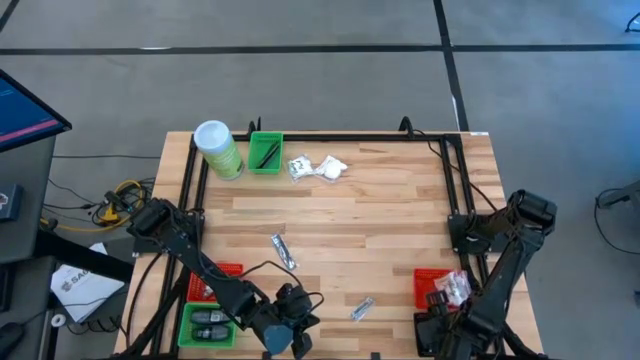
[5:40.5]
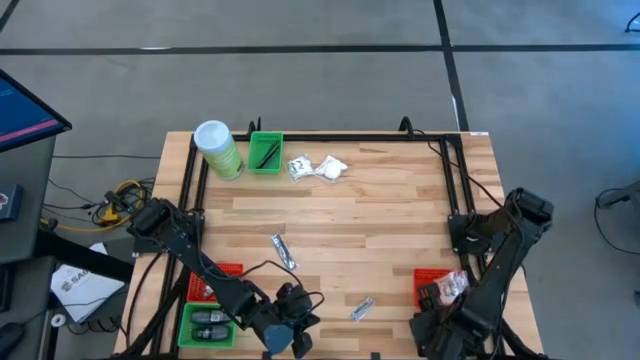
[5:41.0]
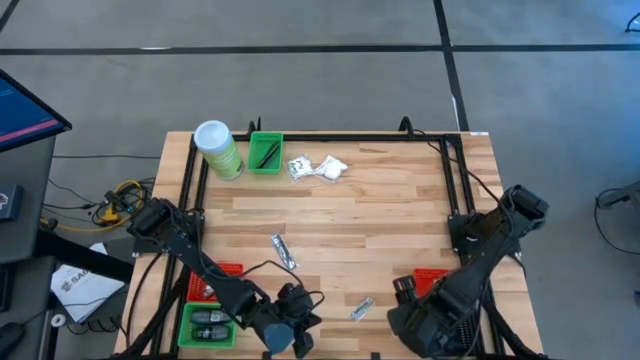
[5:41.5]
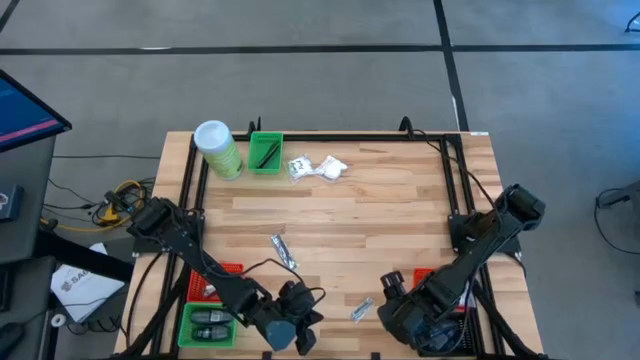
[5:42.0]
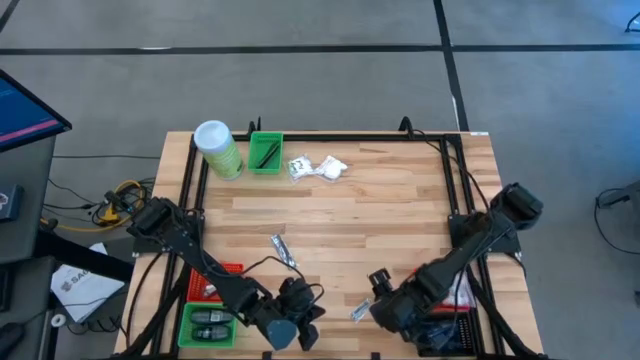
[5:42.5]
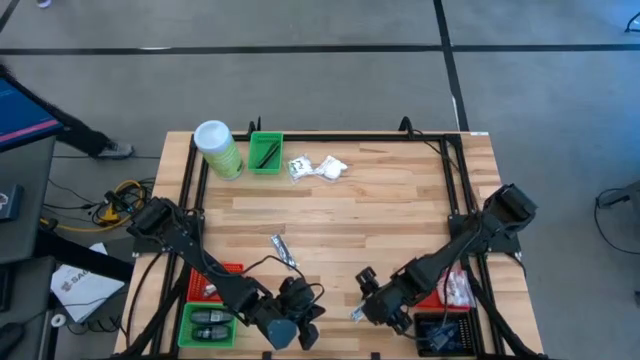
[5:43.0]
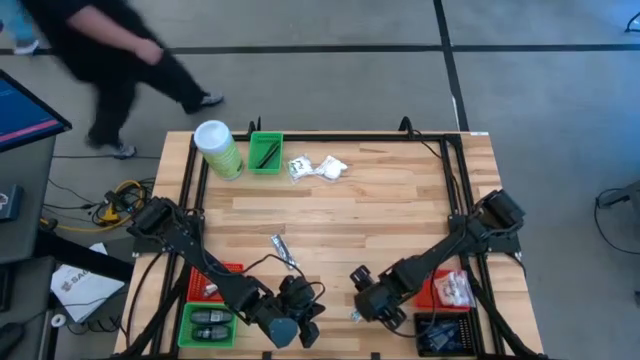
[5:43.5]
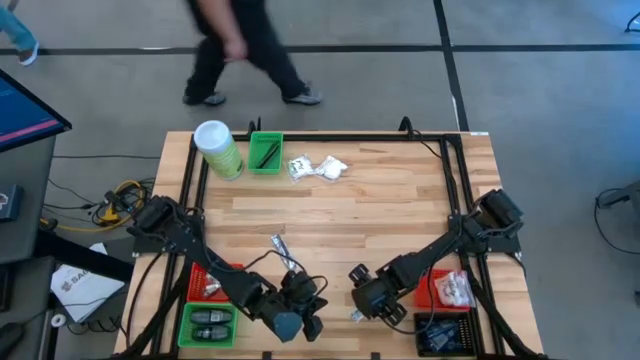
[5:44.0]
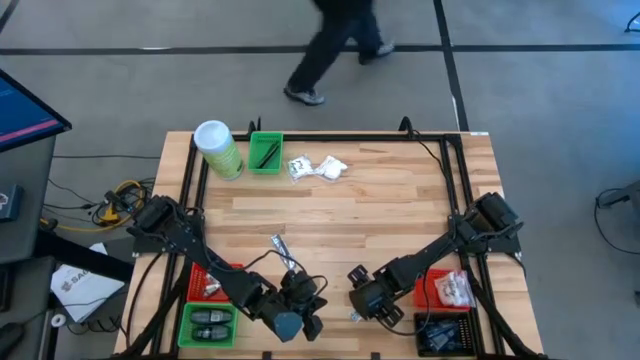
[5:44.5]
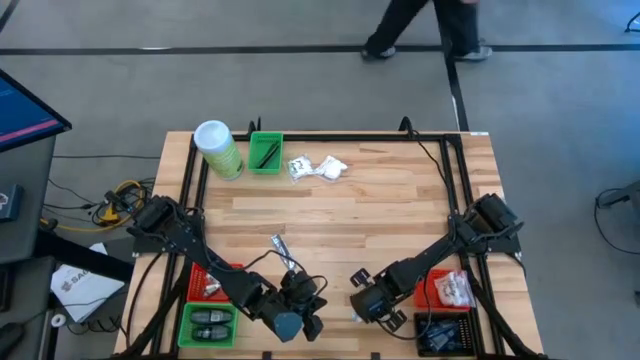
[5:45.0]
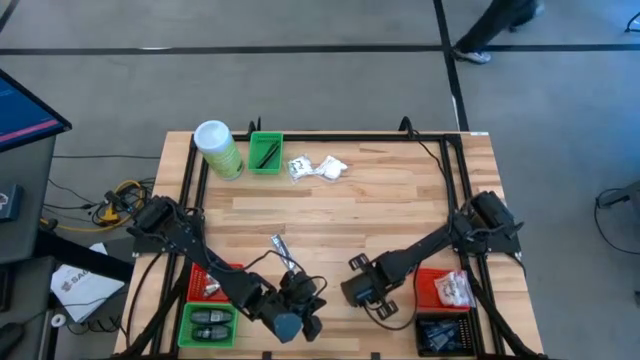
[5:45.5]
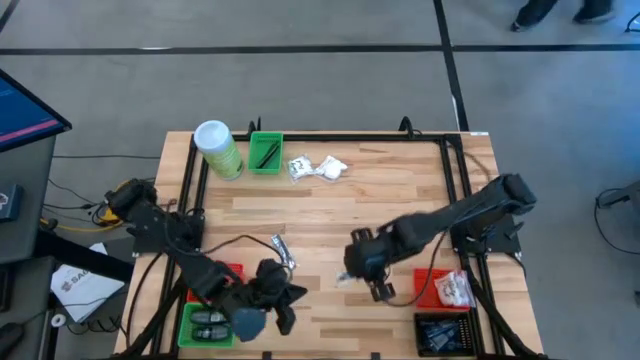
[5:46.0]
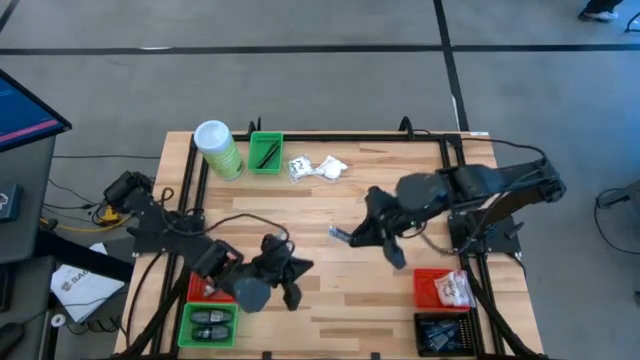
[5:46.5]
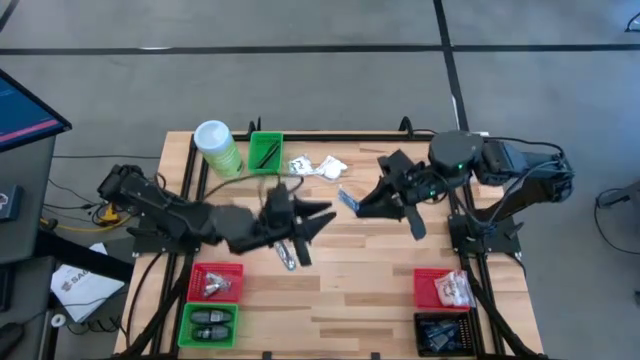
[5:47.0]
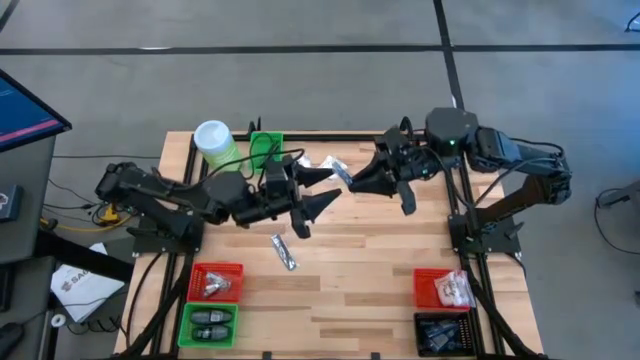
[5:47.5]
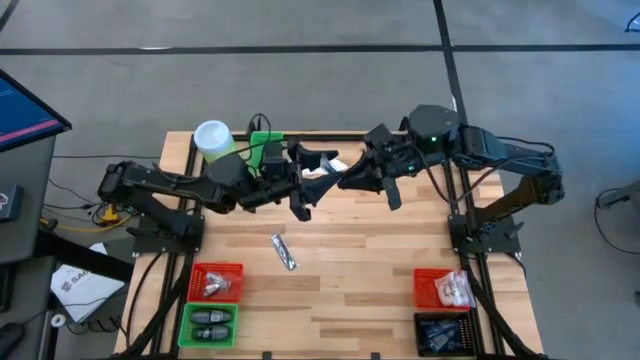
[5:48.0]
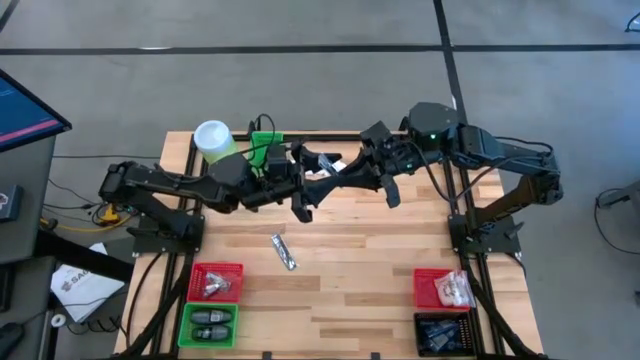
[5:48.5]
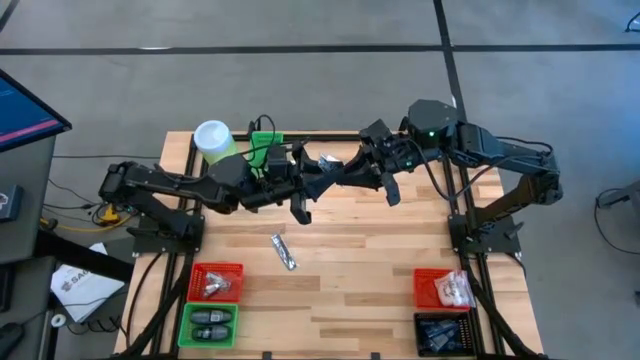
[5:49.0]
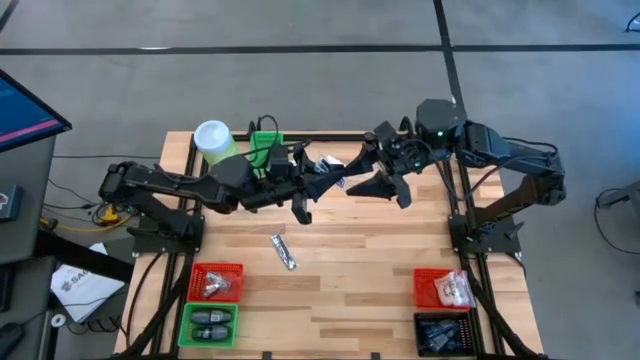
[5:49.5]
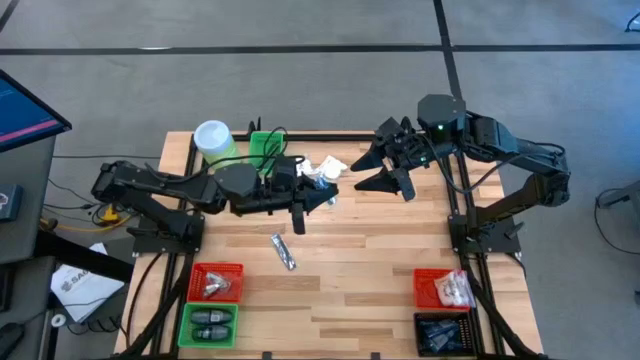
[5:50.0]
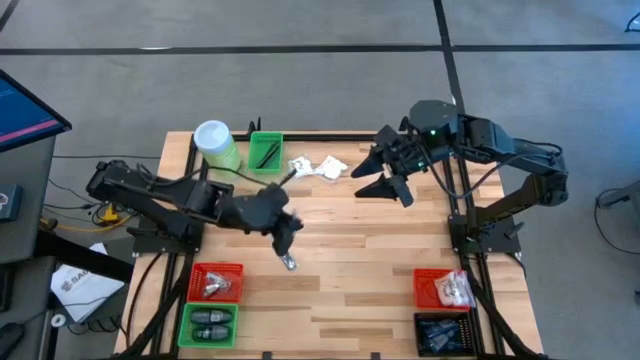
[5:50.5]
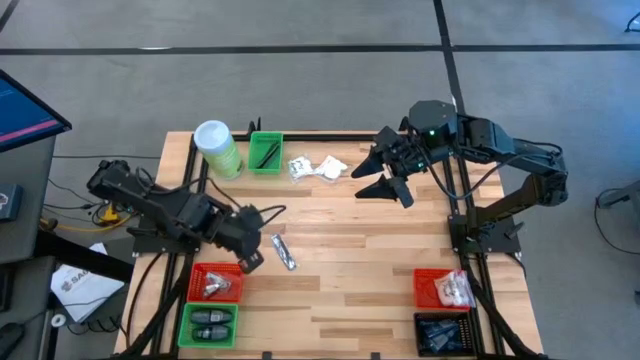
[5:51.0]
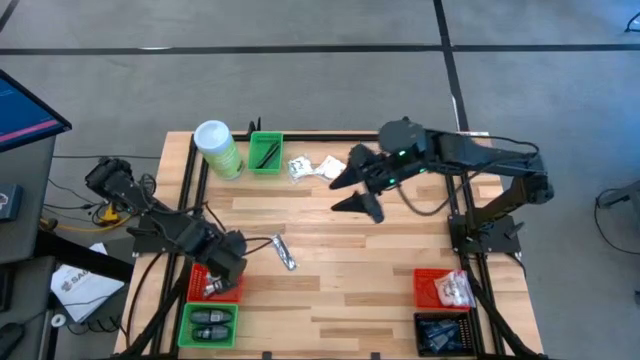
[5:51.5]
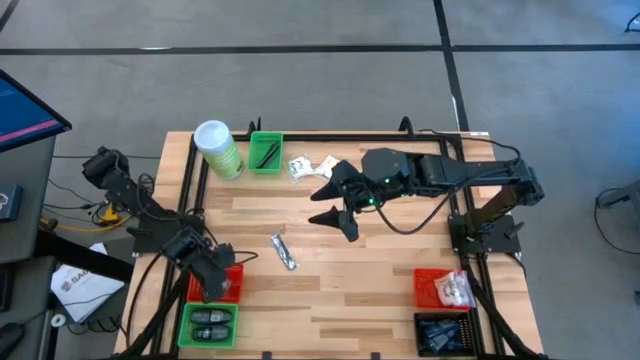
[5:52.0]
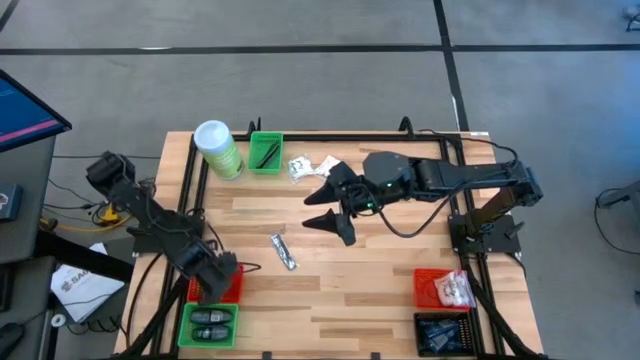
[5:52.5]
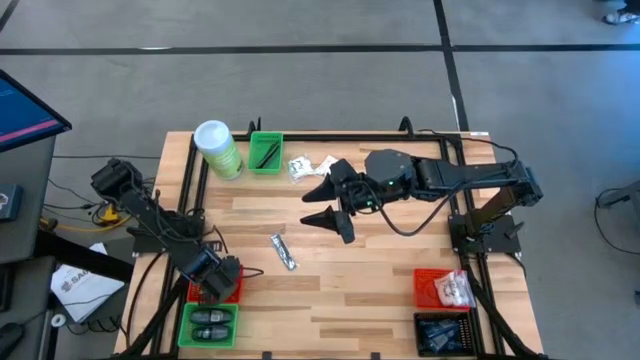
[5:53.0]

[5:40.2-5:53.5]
Task: Pick & Place Travel size toiletries
Put the nail cutter into the left red bin

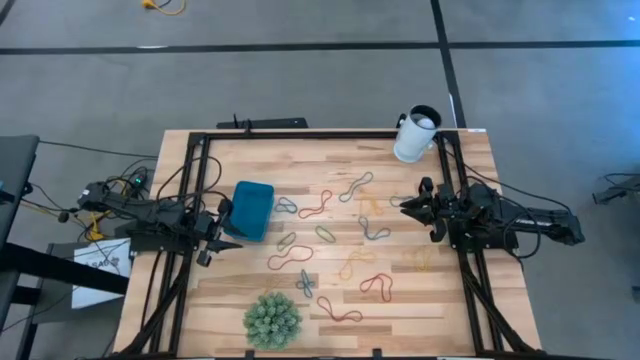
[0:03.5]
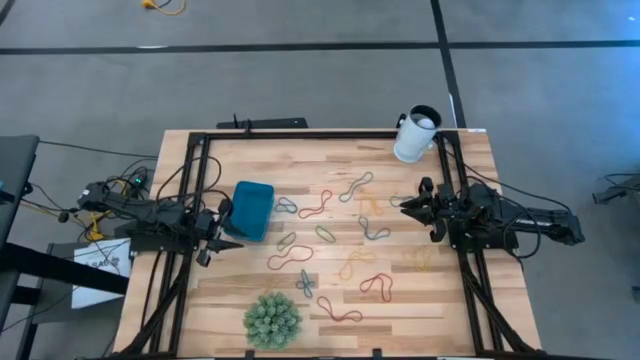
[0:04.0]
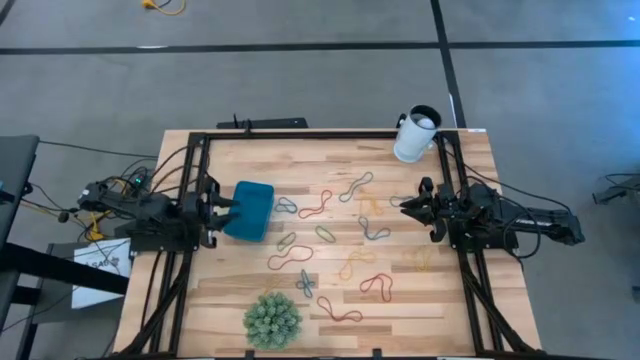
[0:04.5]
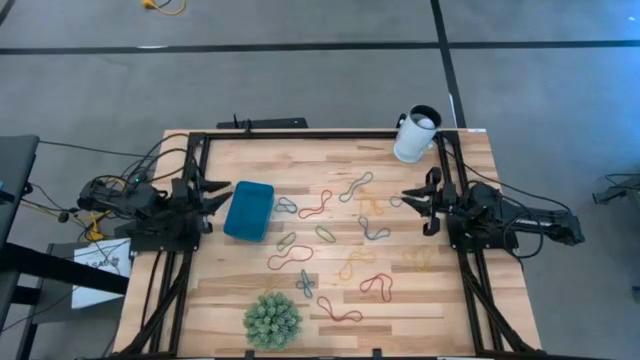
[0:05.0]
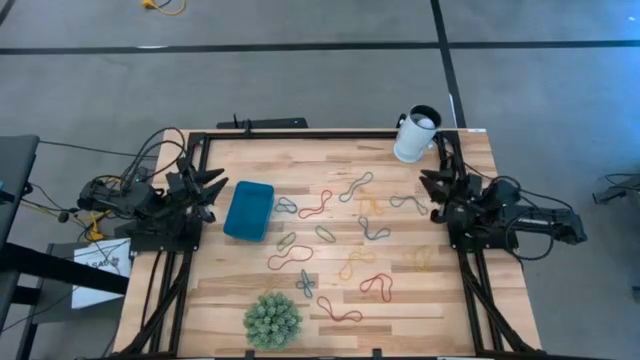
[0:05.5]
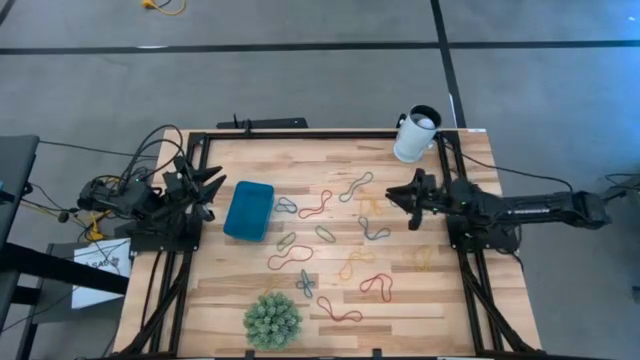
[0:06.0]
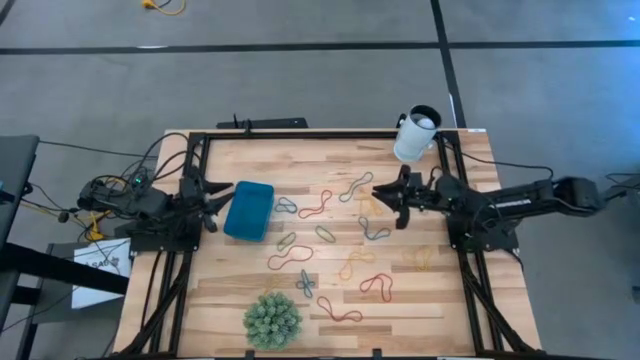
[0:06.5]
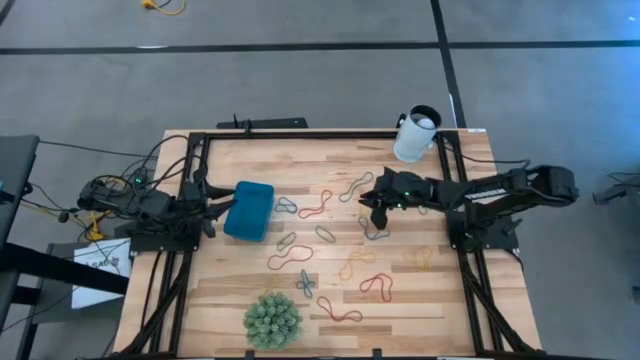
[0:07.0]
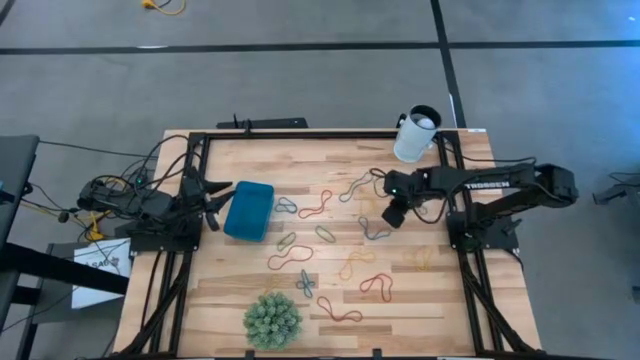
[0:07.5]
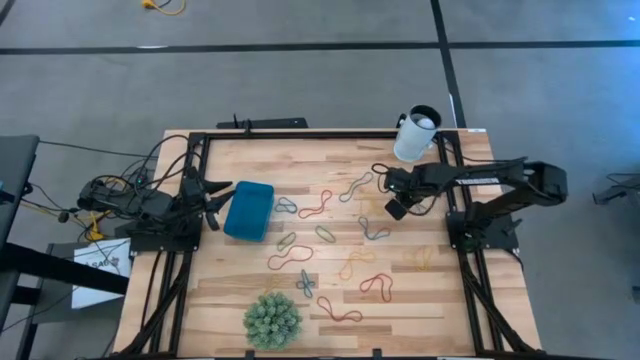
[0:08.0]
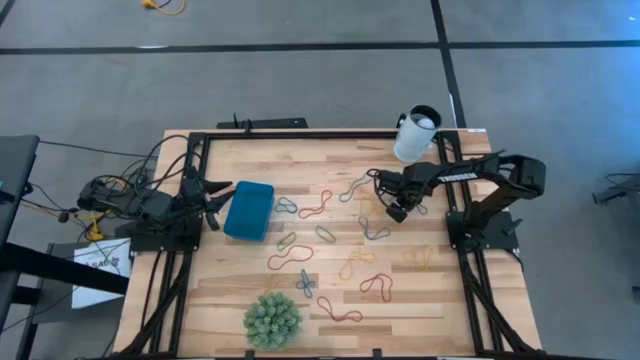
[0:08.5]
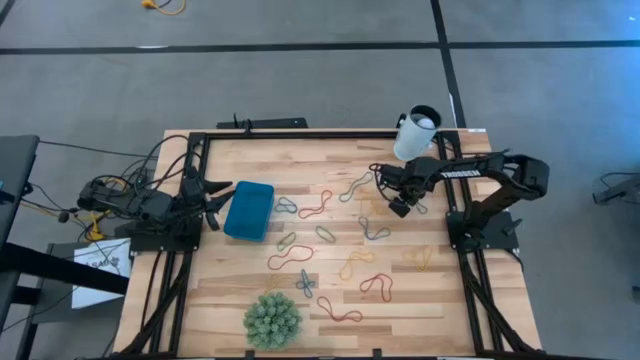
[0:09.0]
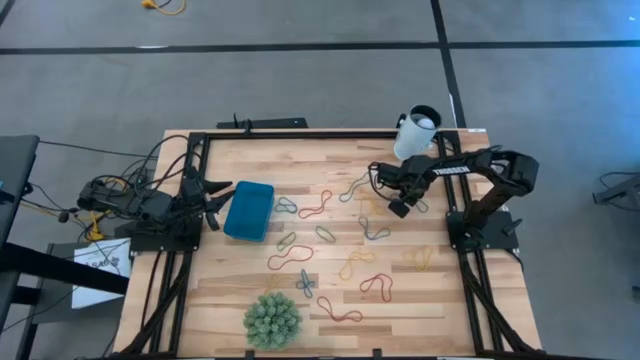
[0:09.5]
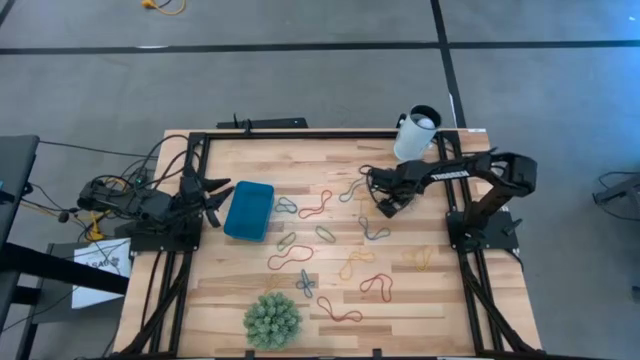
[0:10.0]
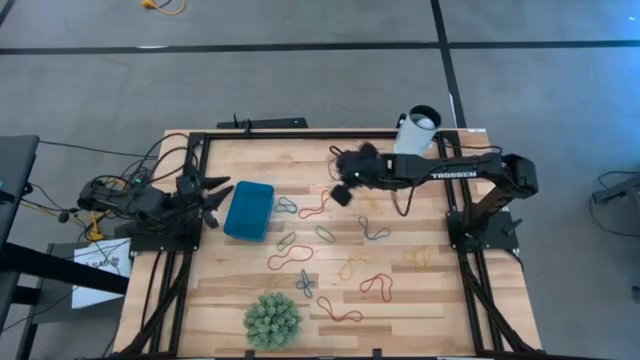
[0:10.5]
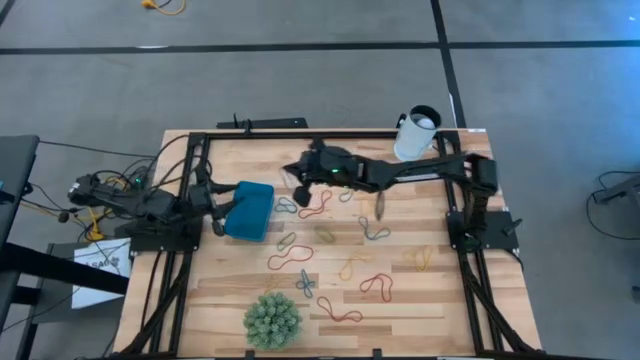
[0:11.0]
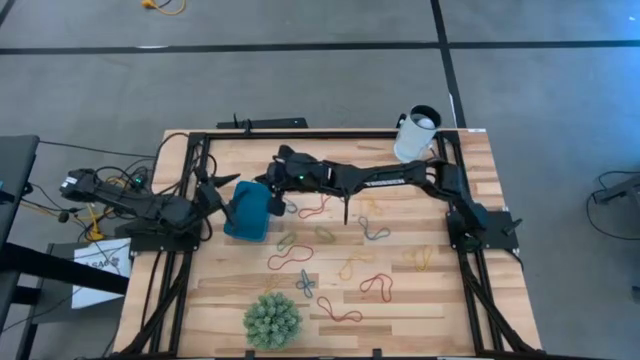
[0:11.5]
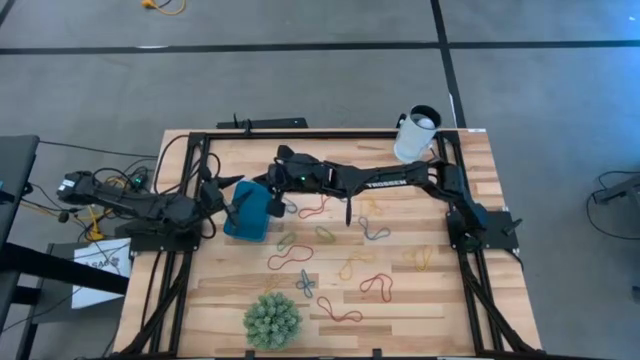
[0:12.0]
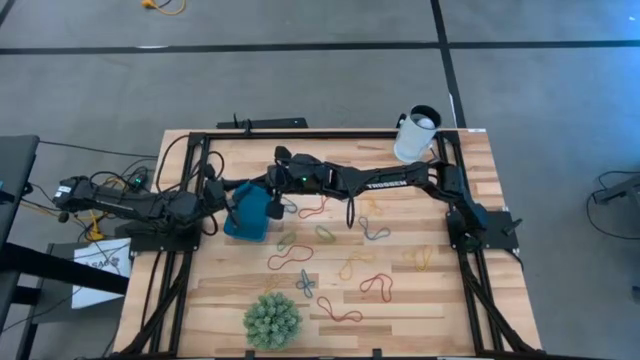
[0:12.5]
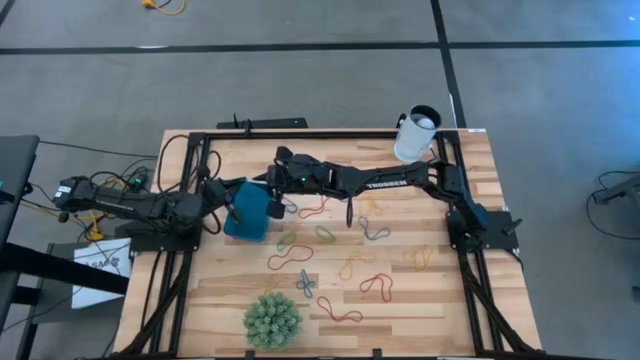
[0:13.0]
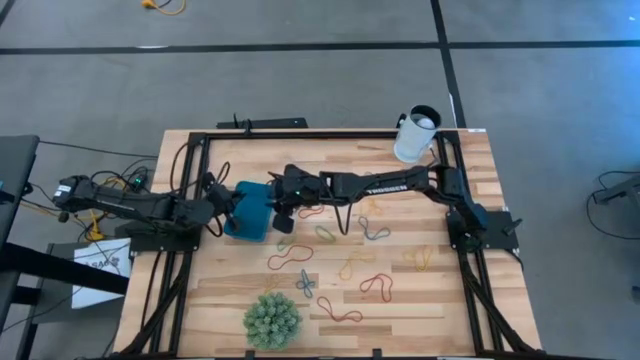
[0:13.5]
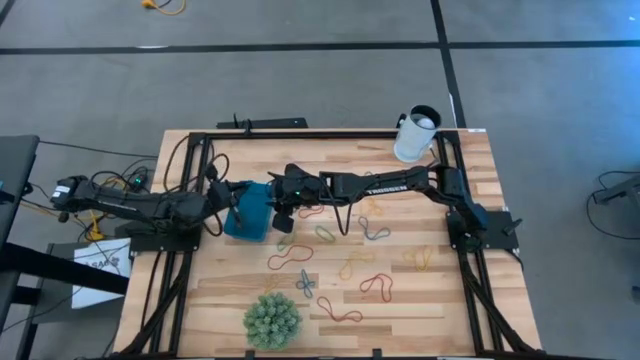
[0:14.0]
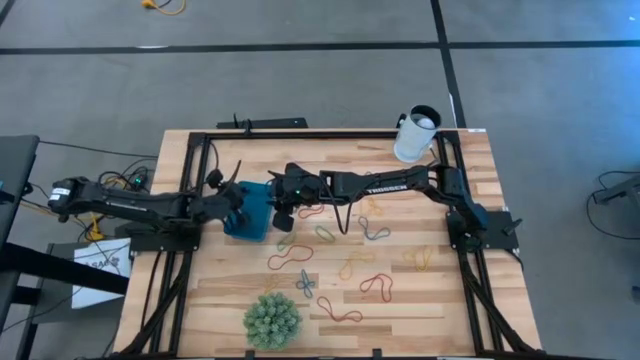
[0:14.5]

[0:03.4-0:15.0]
Task: Pick and place items into bin
Put the blue rubber band into the blue bin
